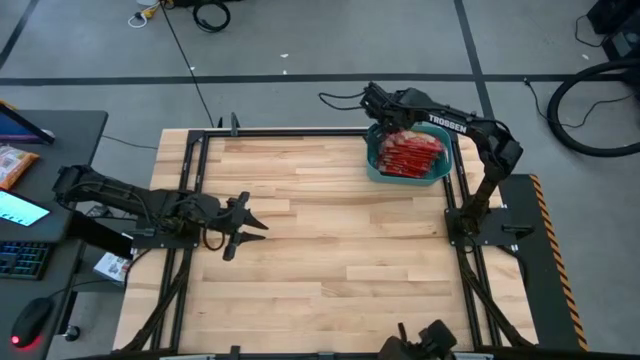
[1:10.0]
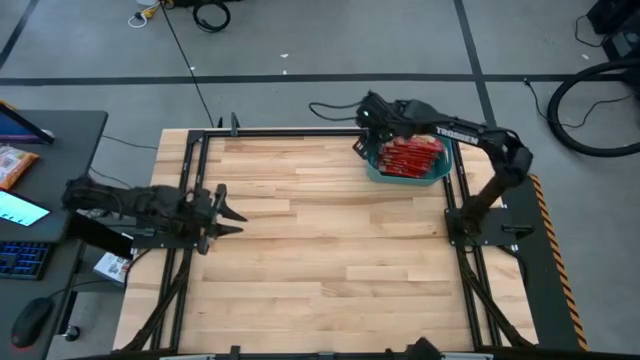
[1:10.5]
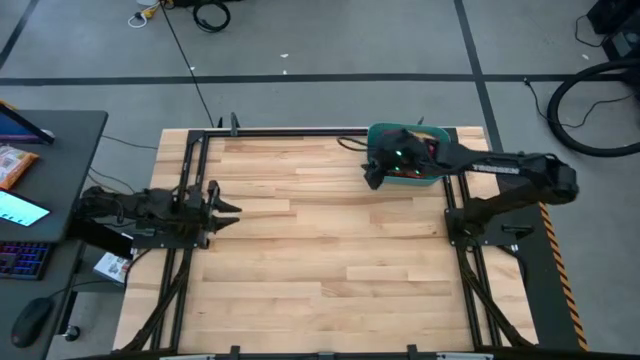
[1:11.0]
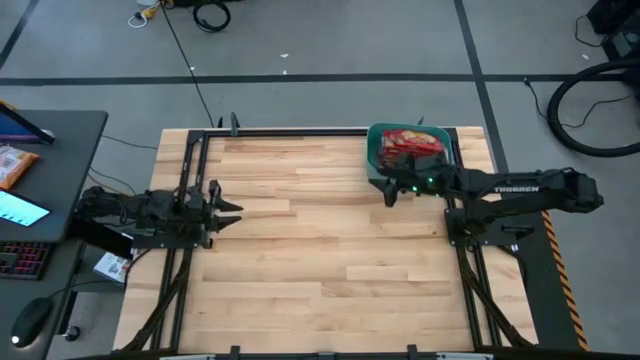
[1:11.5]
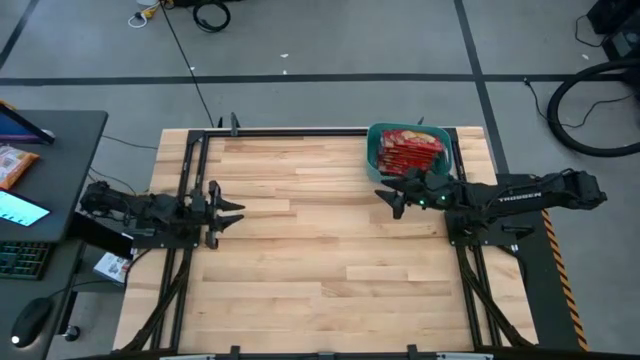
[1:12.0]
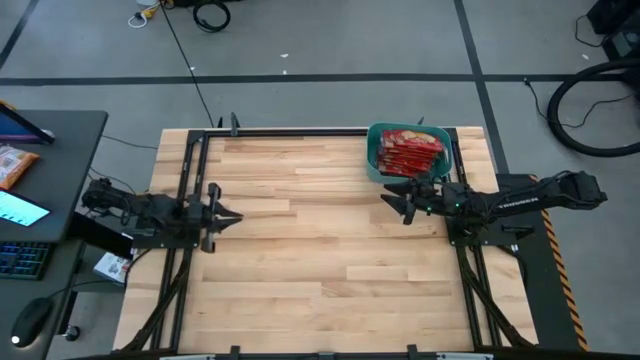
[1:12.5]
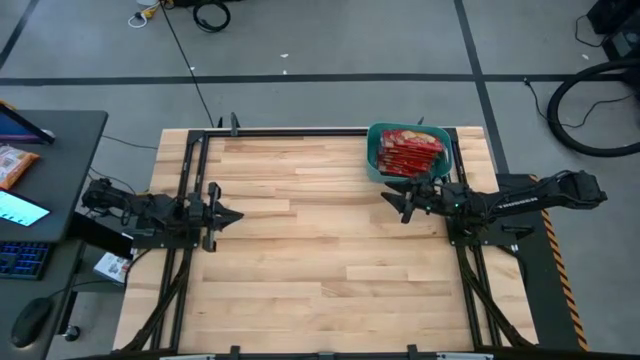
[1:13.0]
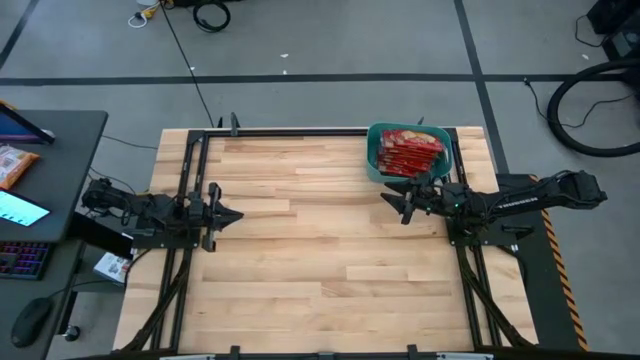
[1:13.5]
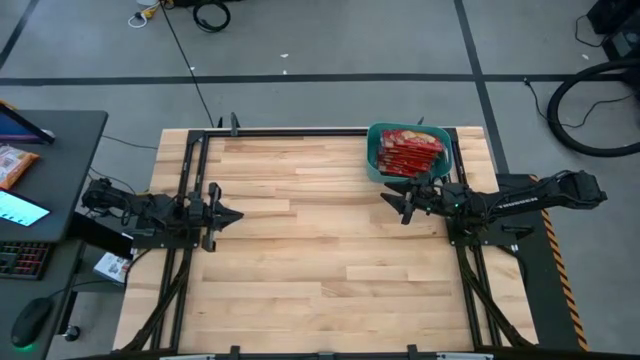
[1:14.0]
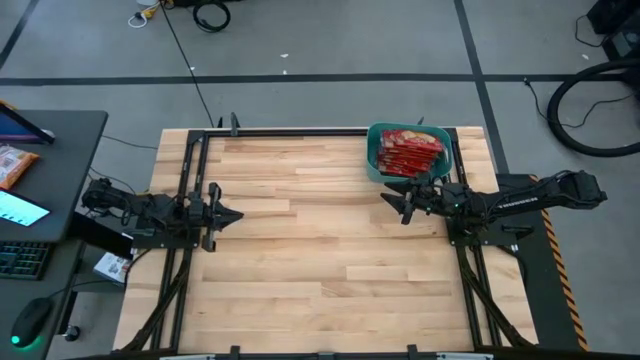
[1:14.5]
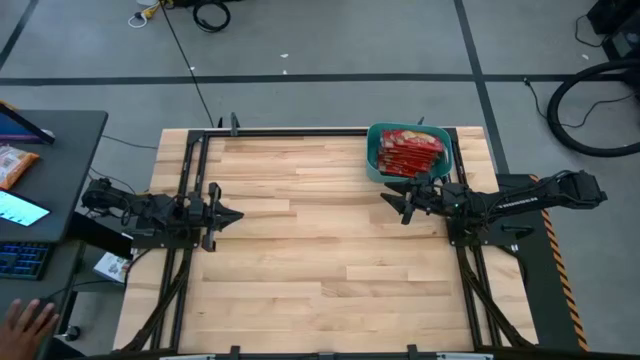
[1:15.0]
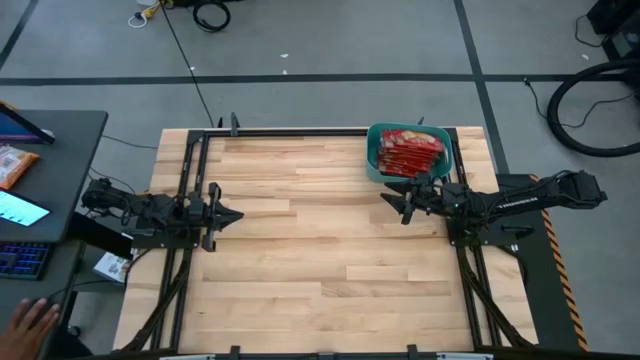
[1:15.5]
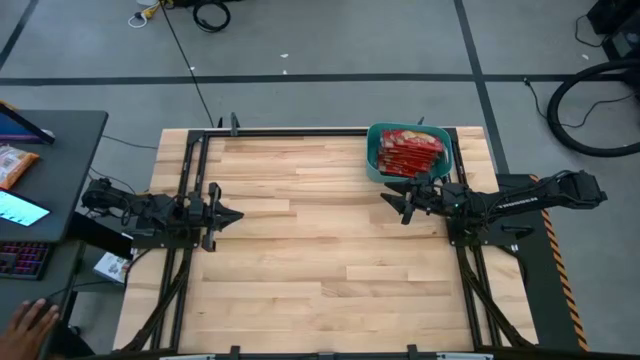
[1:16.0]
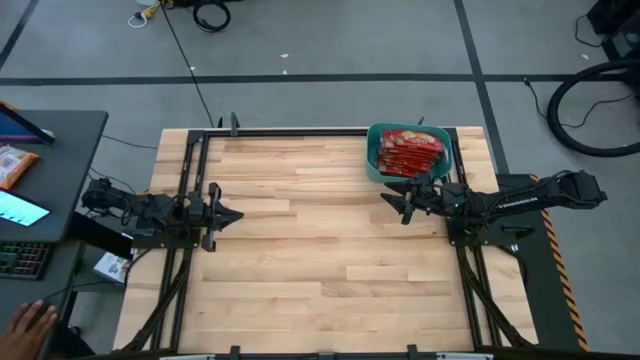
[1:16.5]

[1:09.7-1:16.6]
Task: Sort popcorn bags into baskets
Return to Home Position

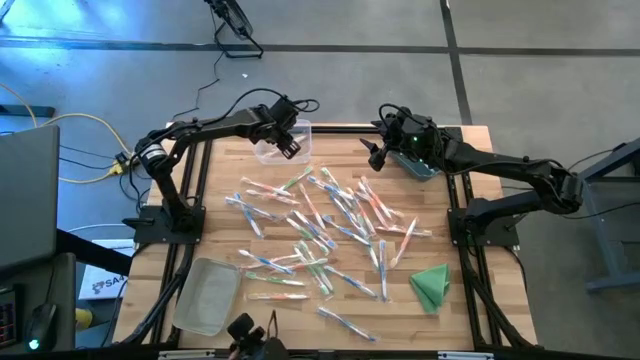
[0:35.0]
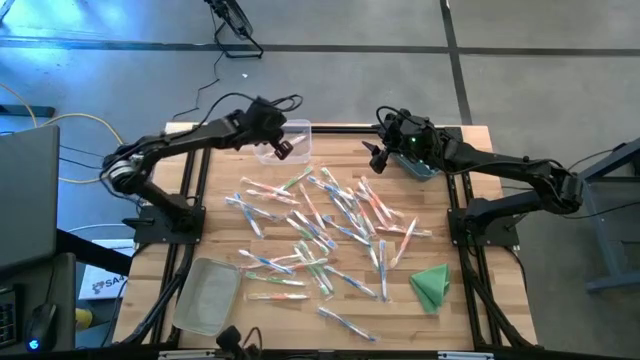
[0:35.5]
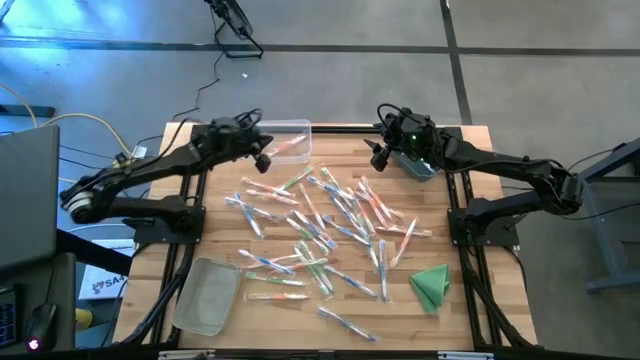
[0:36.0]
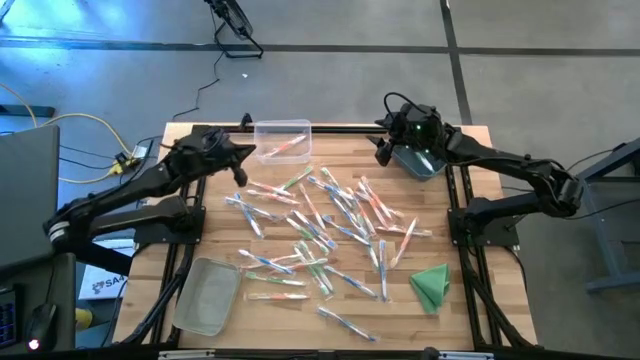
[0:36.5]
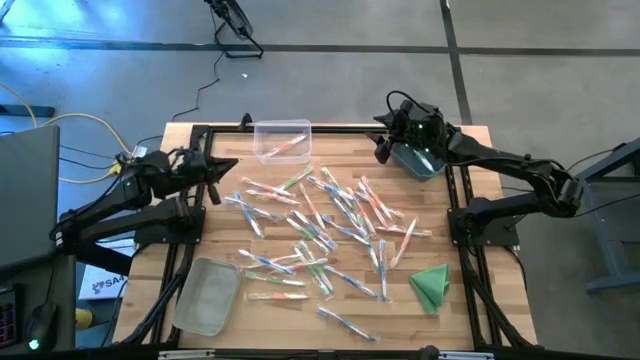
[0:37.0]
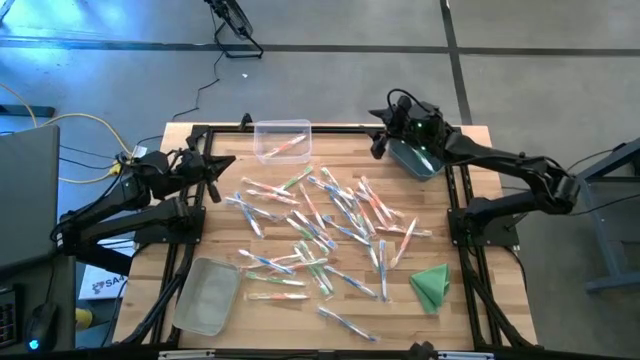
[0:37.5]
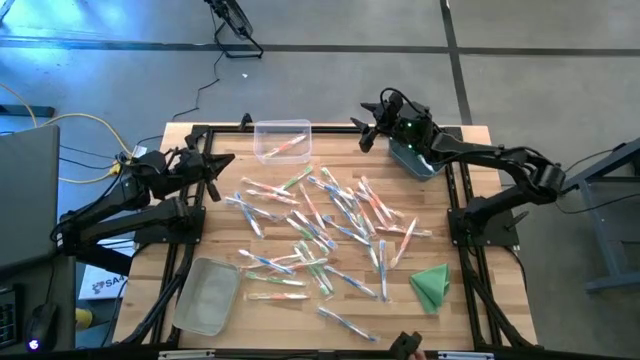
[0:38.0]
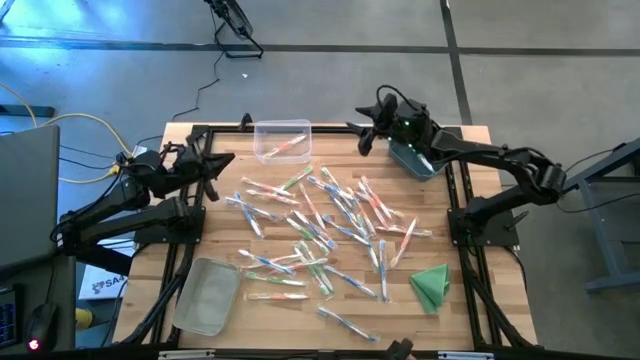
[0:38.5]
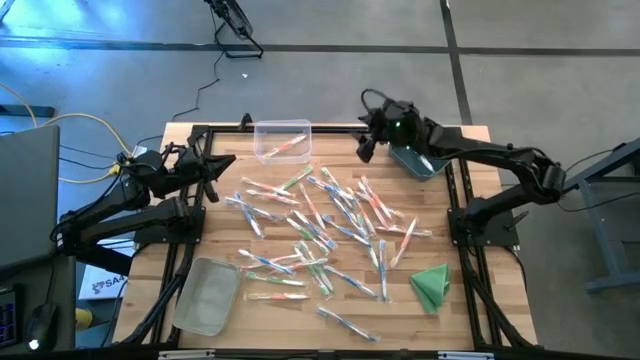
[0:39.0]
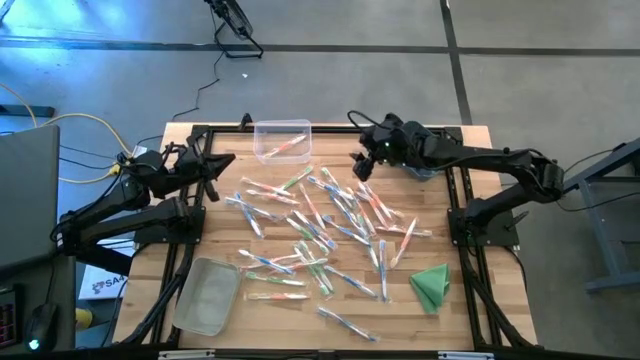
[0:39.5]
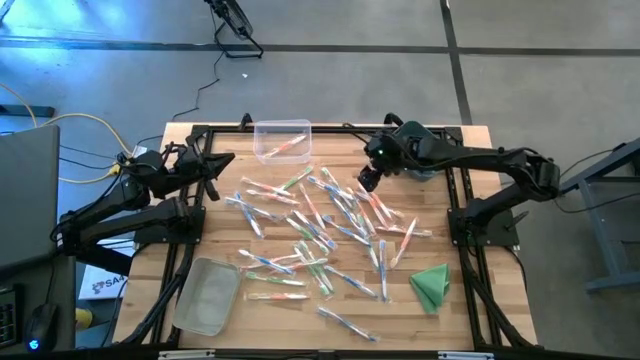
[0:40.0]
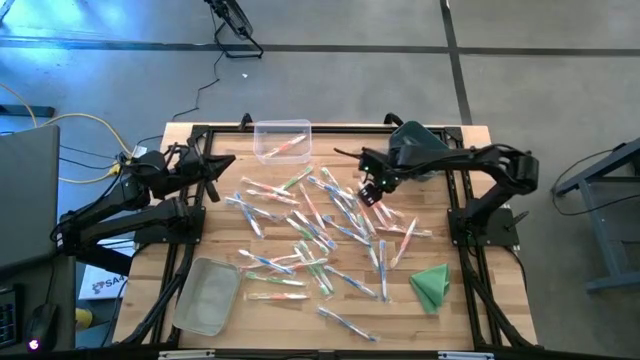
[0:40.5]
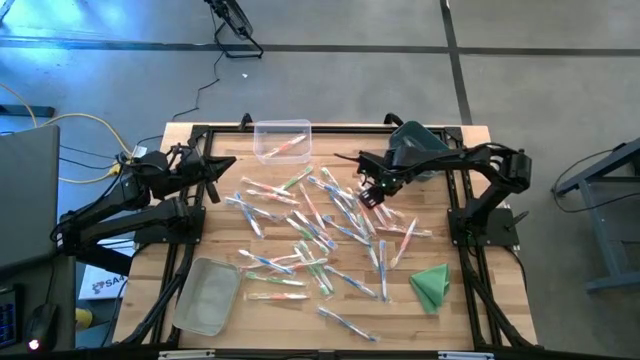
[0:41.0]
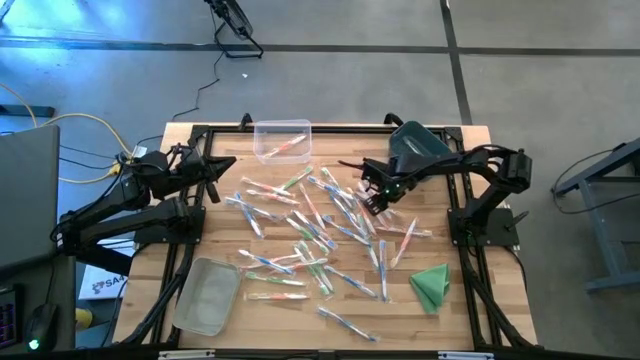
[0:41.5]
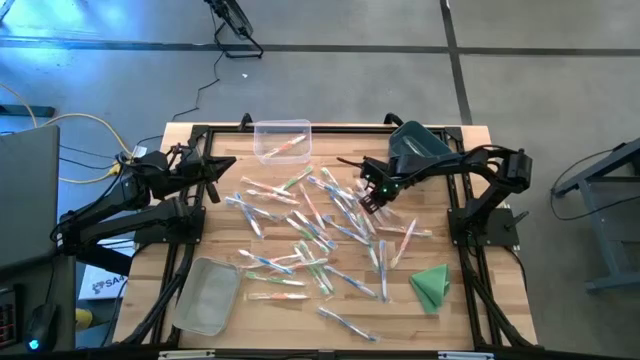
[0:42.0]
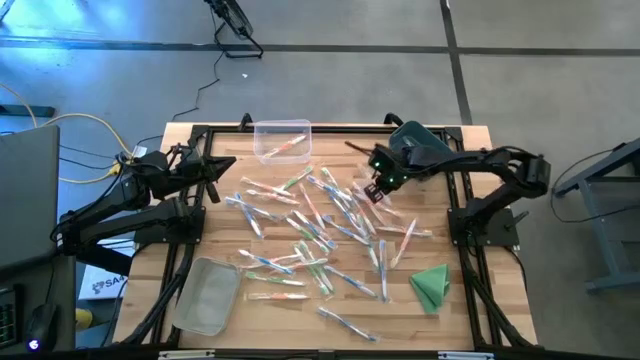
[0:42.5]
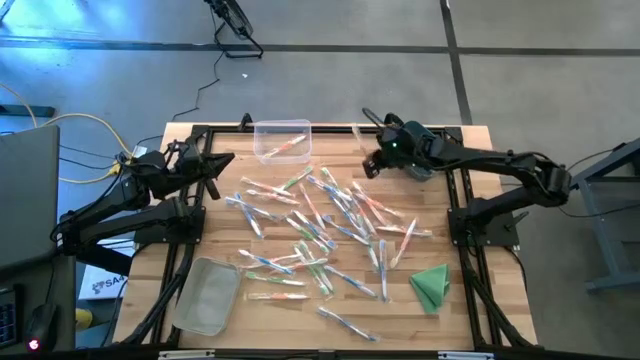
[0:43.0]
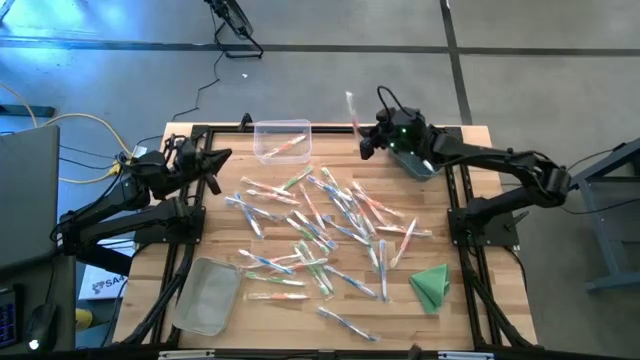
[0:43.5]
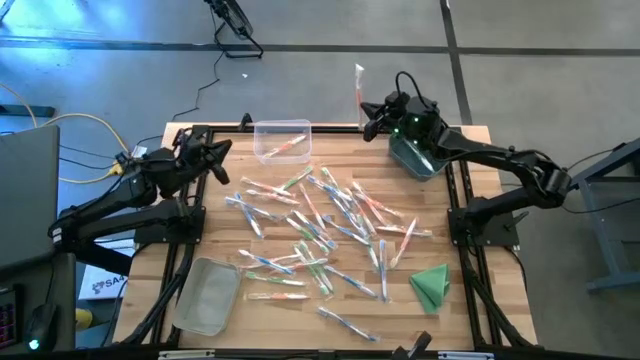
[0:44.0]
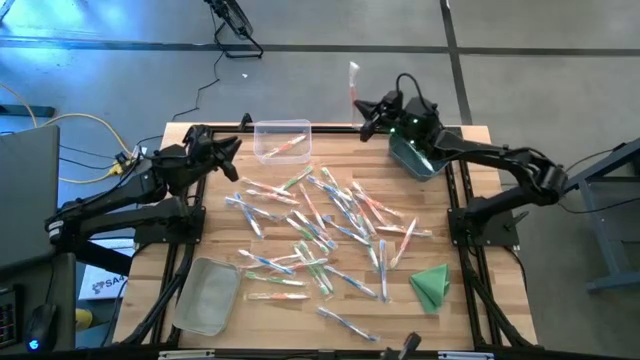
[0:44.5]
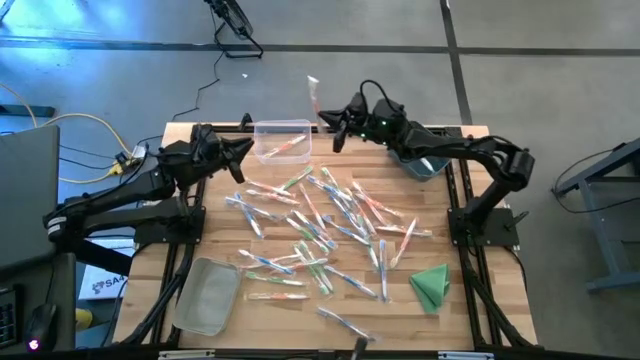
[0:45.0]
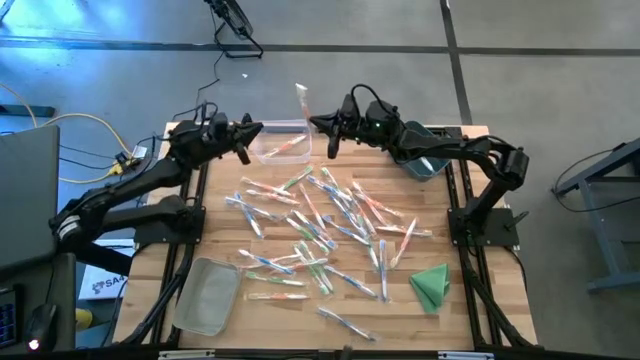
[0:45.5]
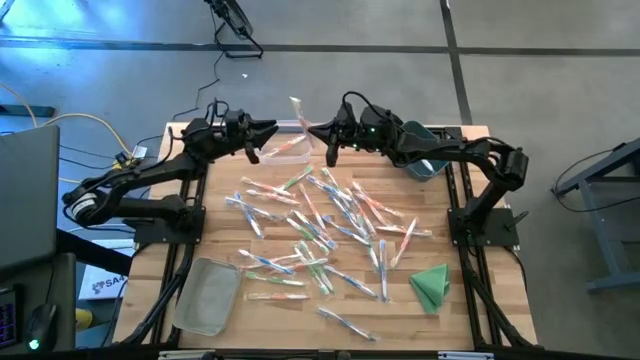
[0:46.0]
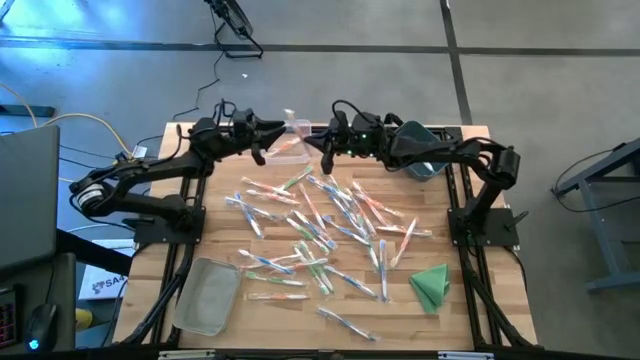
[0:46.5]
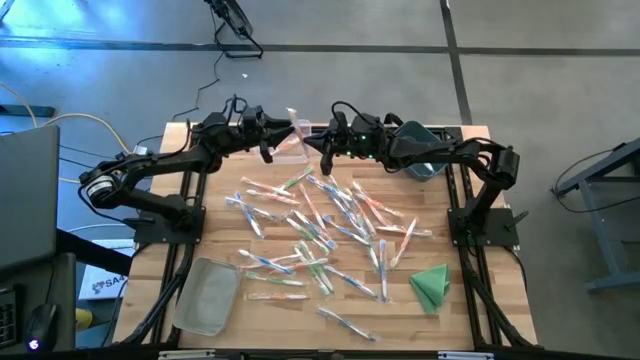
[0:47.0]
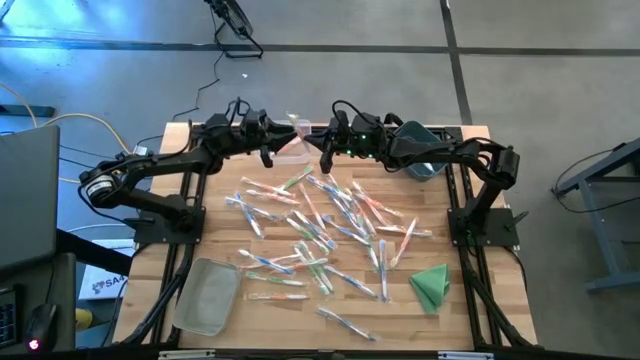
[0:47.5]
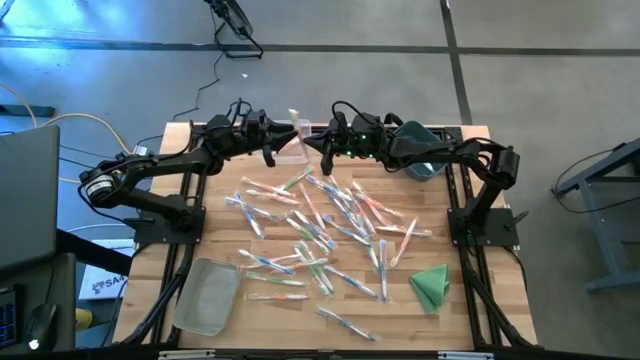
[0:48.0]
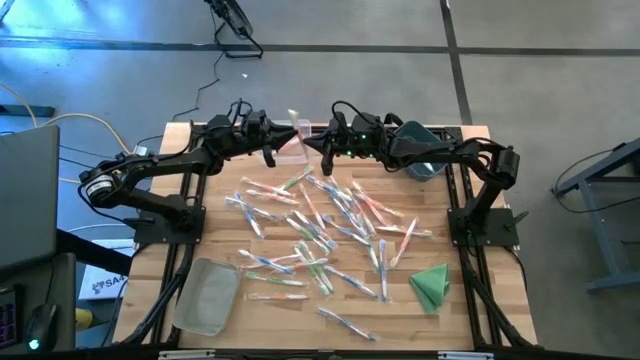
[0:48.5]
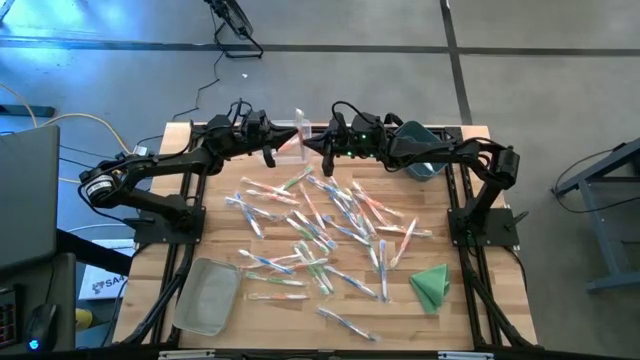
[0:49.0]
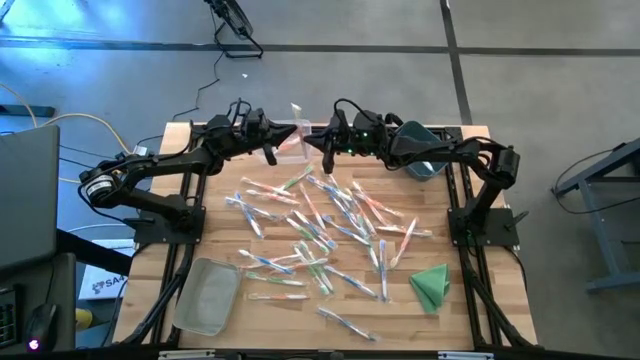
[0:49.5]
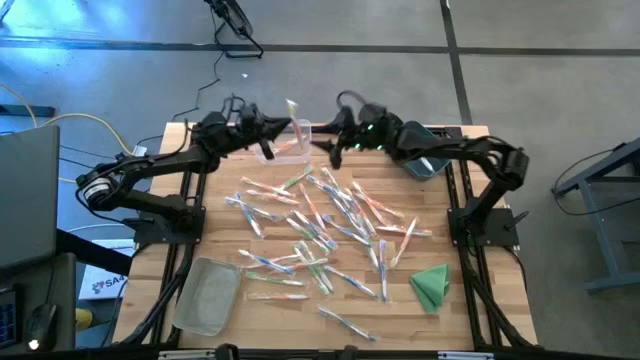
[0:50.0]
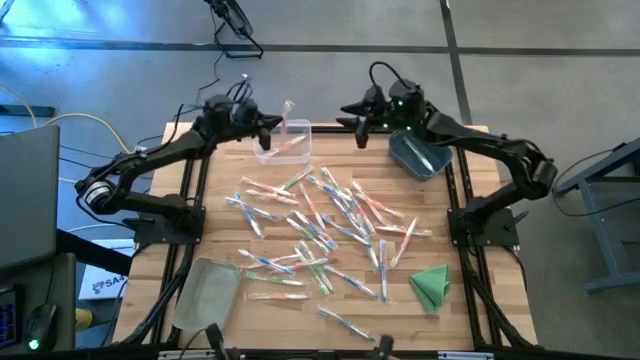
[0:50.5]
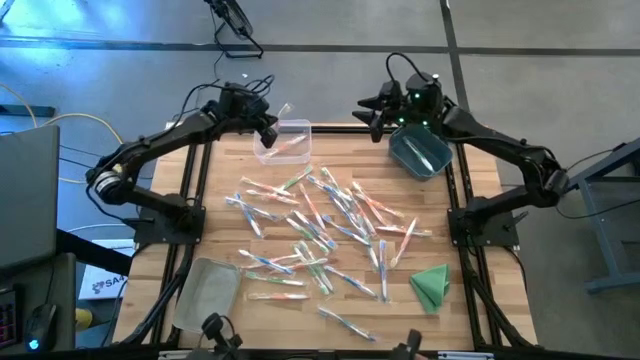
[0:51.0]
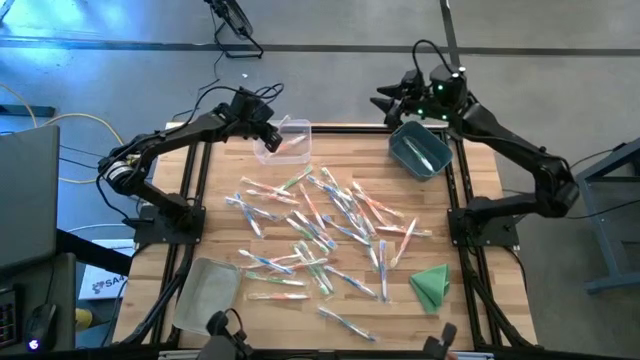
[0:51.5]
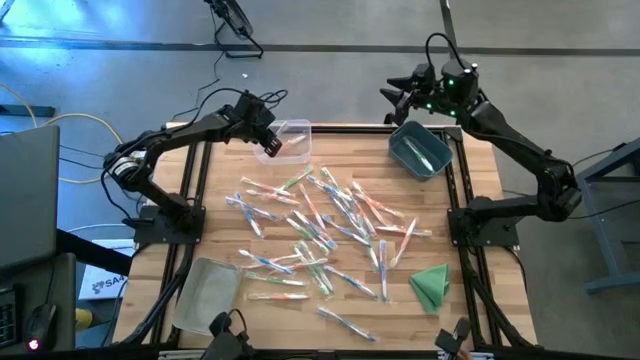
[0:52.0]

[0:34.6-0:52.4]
Task: Pick & Place Toothbrushes
Put the orange toothbrush into the transparent bin
